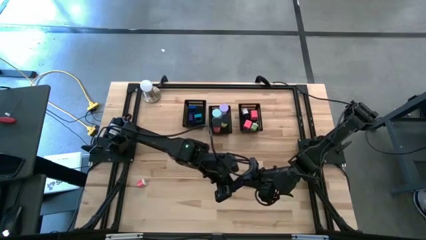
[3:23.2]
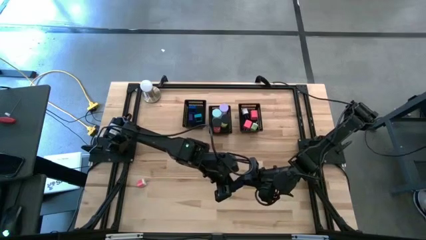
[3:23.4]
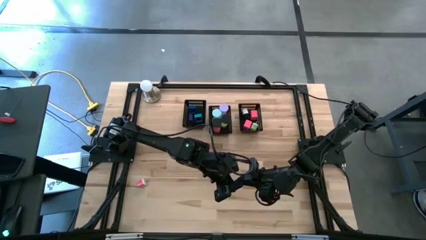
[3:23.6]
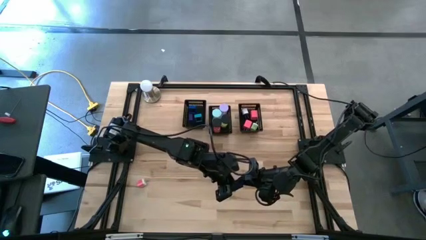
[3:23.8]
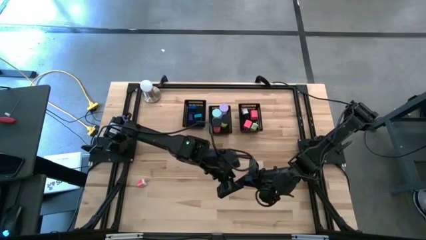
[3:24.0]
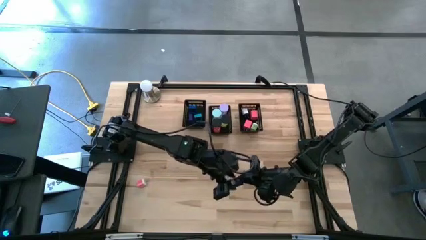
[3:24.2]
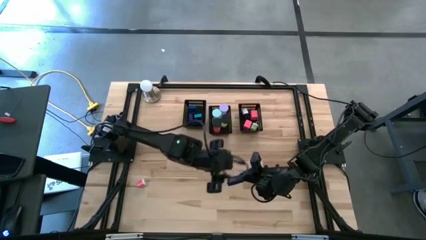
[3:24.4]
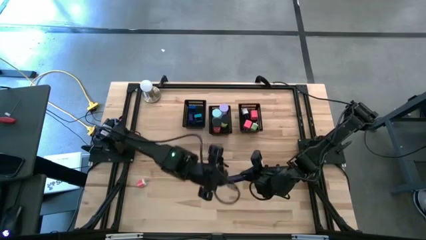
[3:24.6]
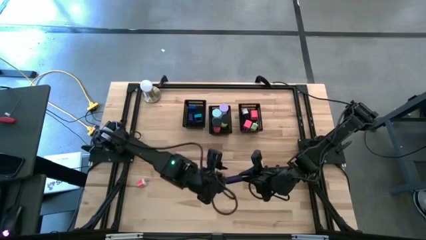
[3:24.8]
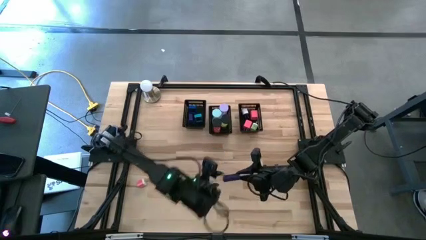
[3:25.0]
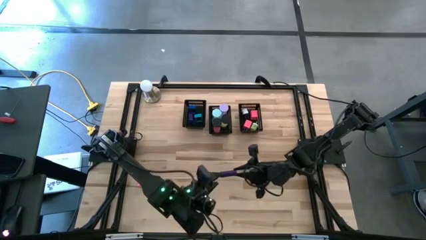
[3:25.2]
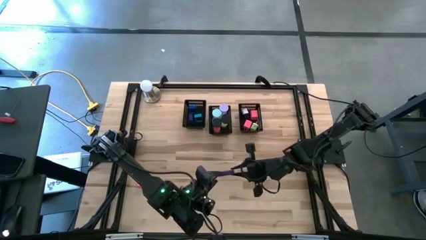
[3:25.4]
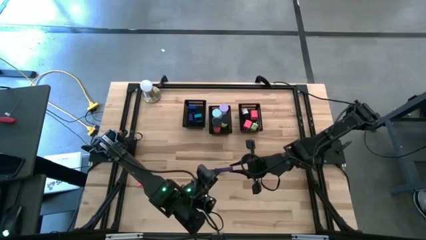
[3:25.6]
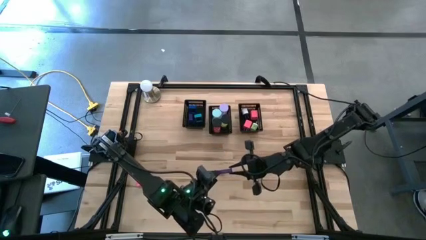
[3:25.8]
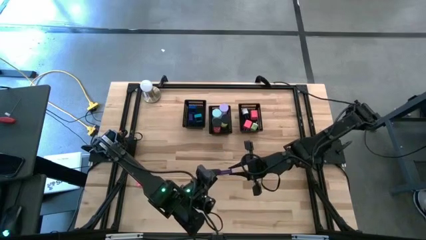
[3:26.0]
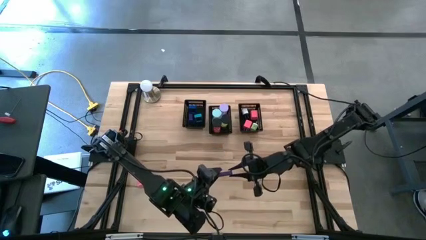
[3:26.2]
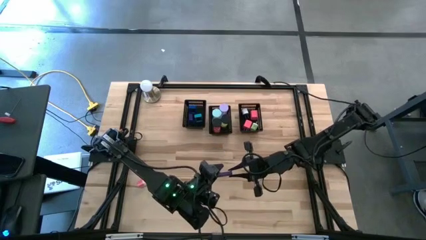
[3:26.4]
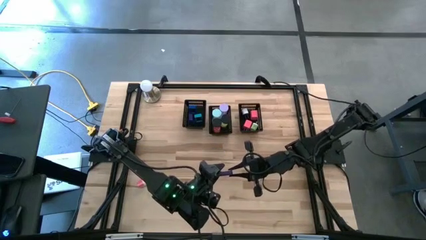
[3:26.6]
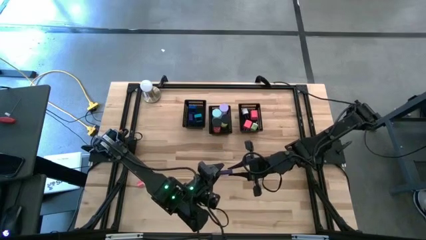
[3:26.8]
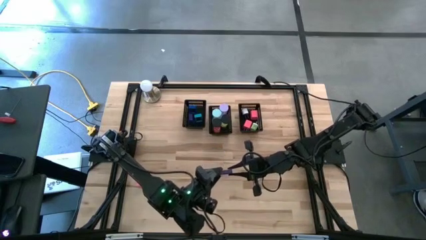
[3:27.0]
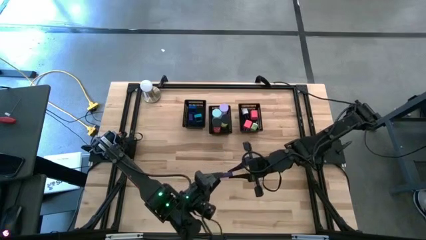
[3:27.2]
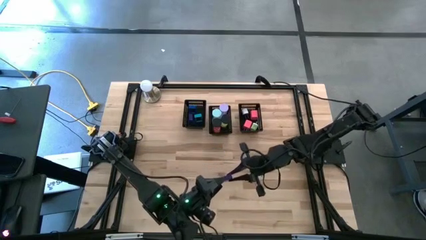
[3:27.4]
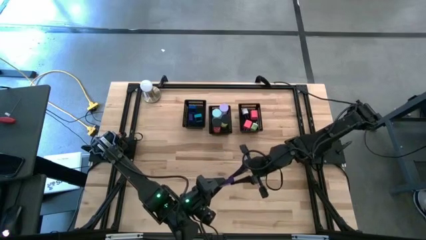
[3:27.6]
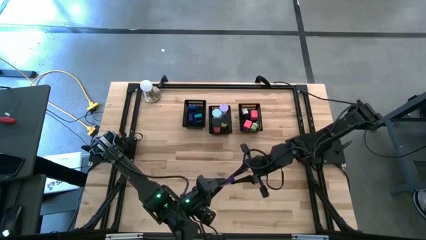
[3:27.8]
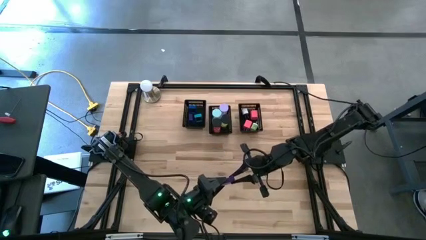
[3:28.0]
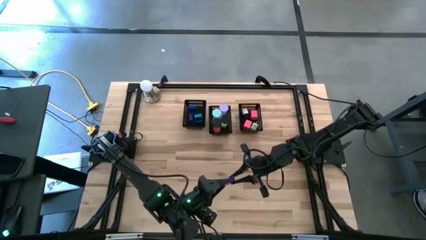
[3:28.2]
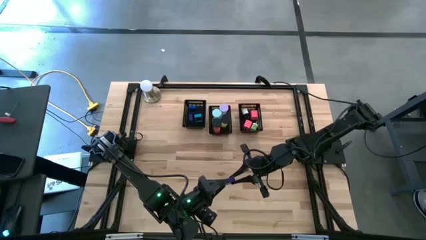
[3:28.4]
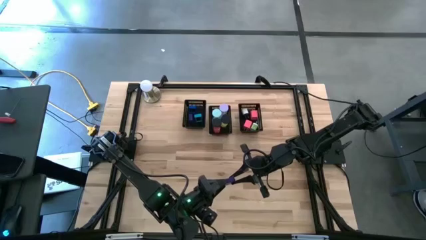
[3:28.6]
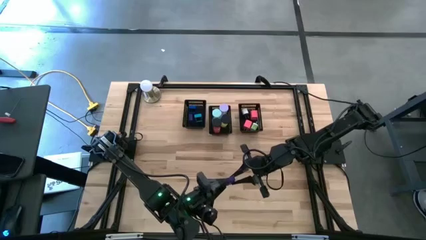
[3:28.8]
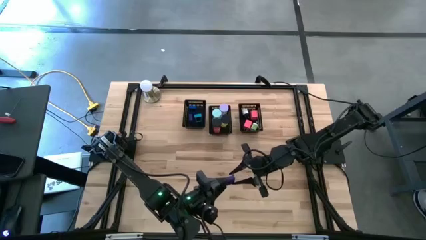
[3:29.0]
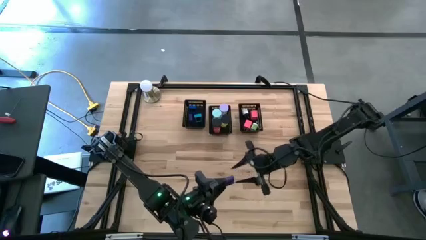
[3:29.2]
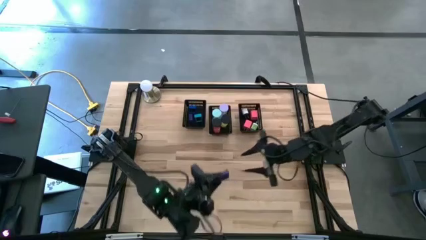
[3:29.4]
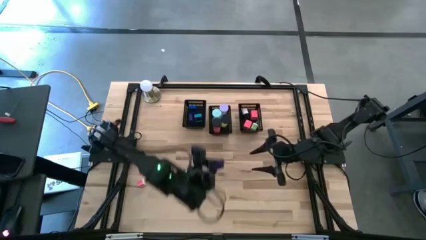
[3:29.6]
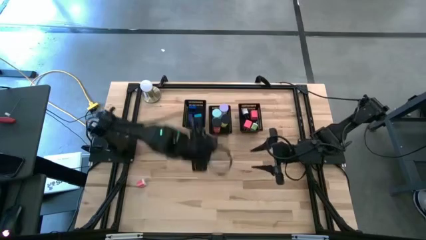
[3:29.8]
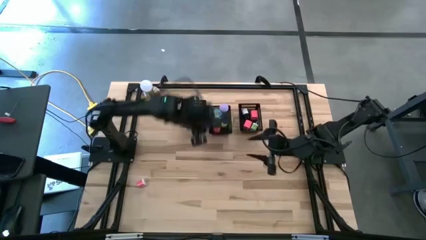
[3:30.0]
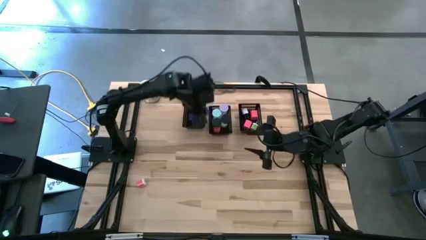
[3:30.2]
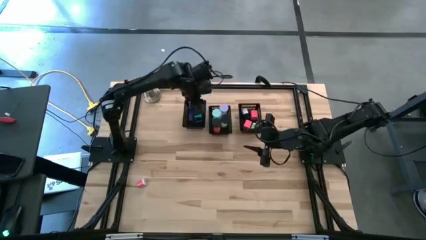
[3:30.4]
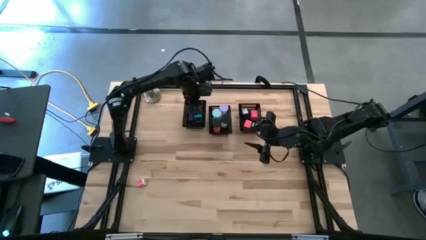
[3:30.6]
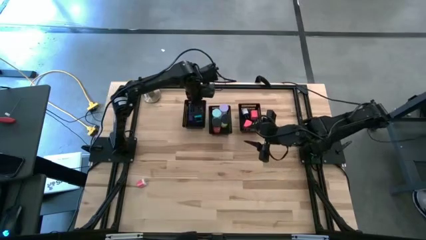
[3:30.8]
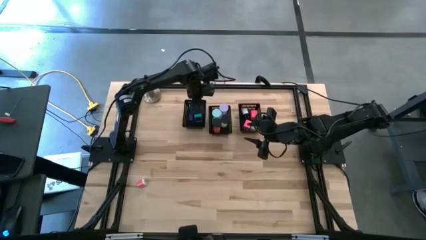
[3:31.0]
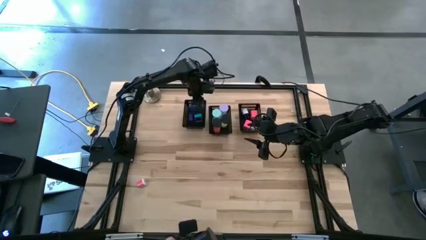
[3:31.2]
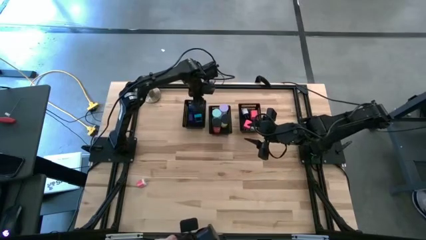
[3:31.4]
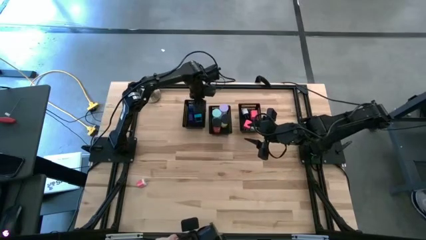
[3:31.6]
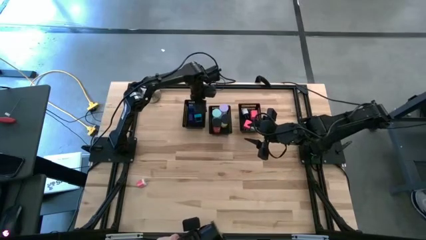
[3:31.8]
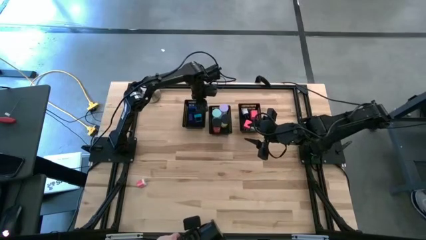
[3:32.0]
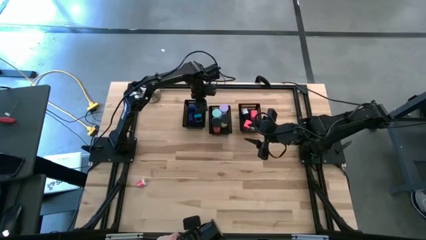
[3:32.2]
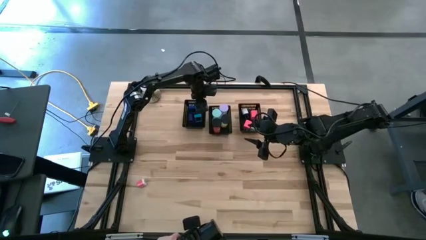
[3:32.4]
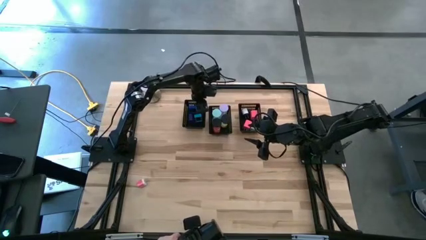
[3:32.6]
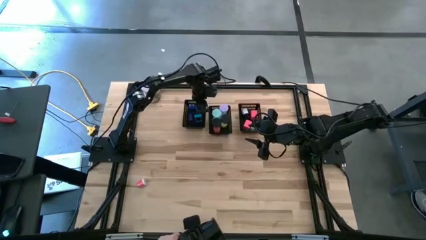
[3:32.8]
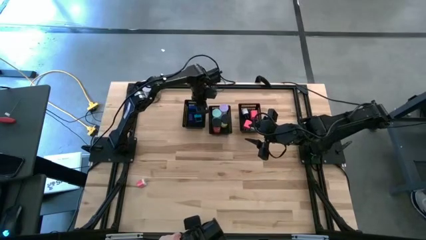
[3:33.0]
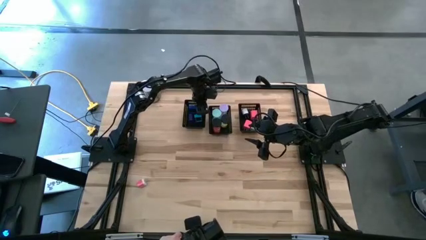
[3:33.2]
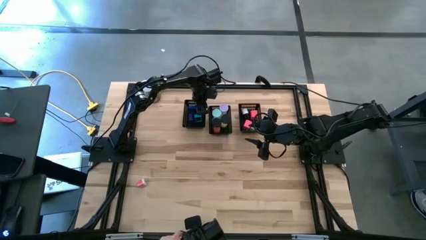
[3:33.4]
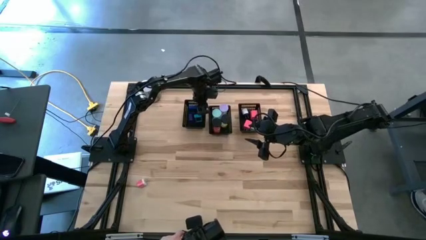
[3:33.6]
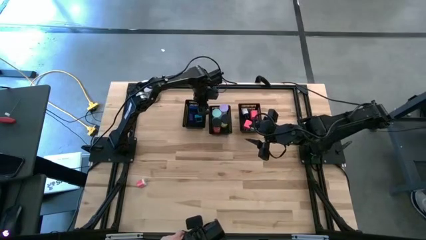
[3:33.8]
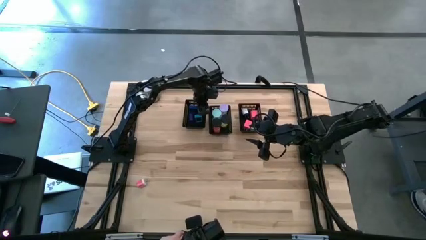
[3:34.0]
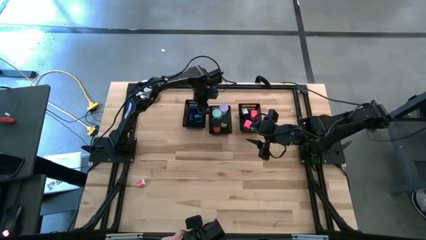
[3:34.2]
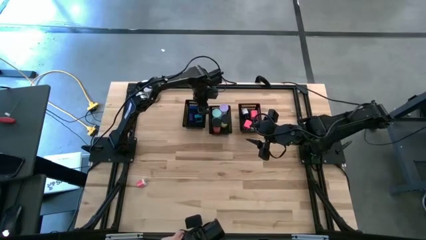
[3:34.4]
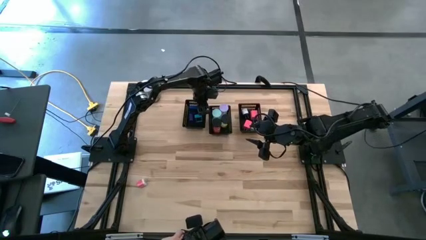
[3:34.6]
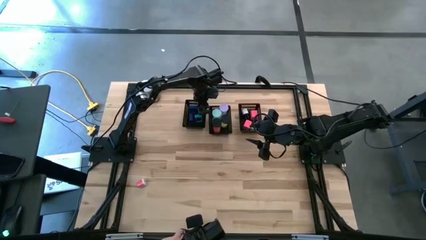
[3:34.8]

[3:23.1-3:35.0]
Task: Pick & Place Office items
Put the blue digital clock into the left black bin

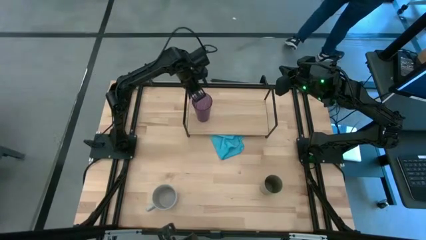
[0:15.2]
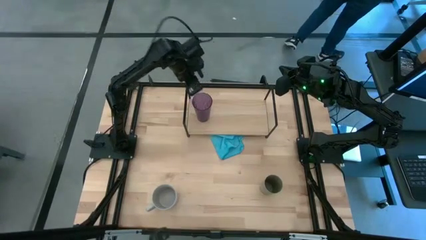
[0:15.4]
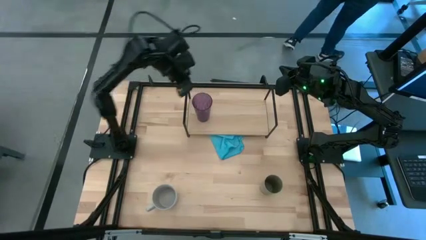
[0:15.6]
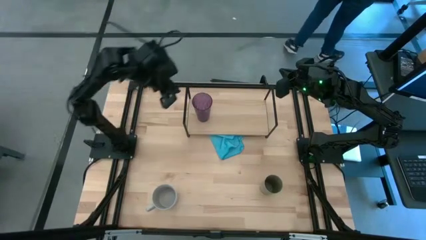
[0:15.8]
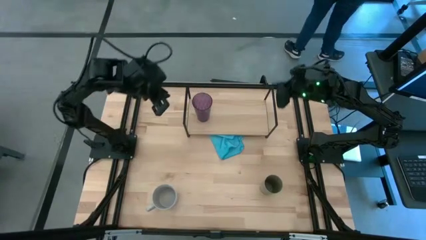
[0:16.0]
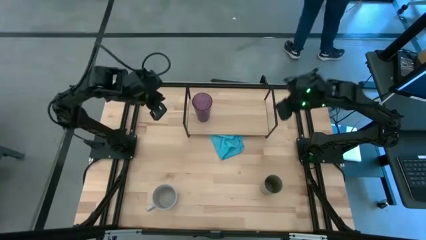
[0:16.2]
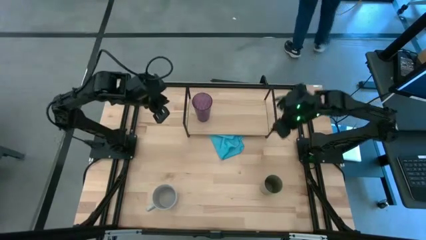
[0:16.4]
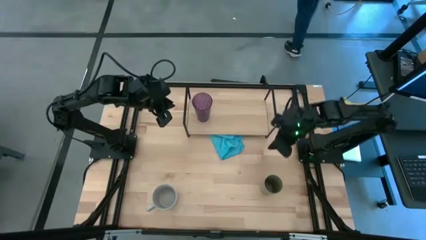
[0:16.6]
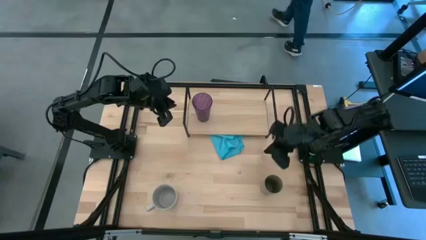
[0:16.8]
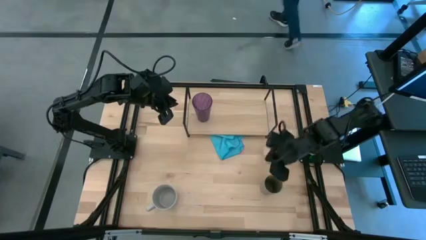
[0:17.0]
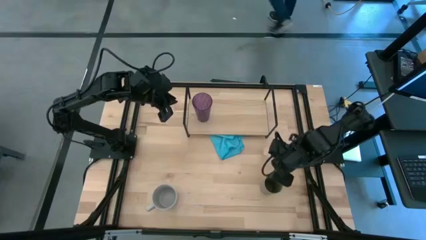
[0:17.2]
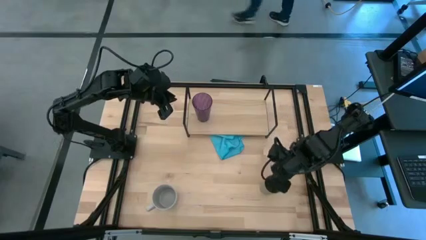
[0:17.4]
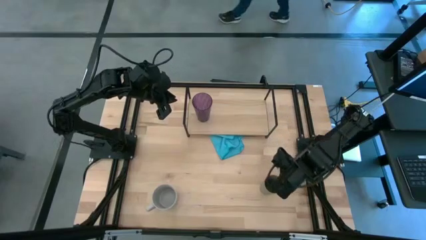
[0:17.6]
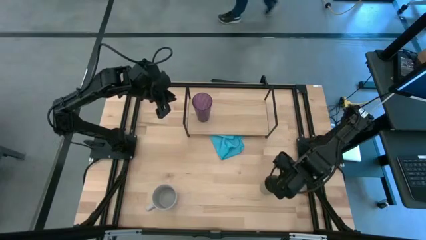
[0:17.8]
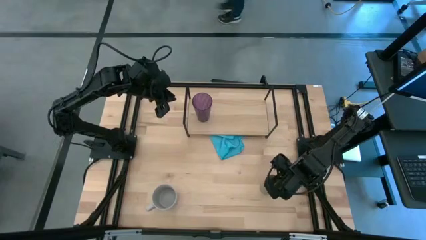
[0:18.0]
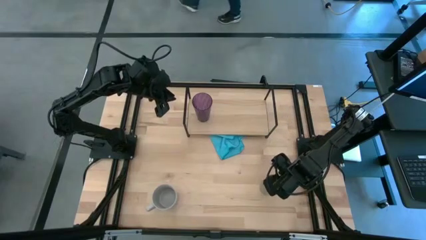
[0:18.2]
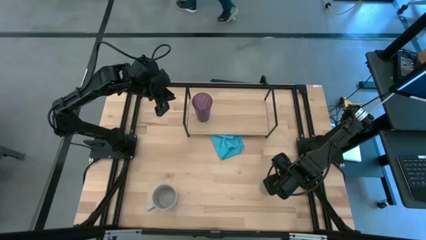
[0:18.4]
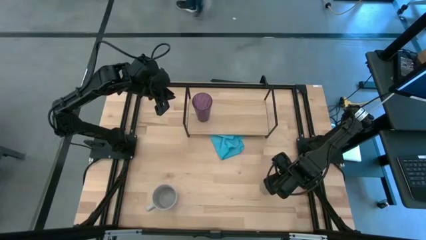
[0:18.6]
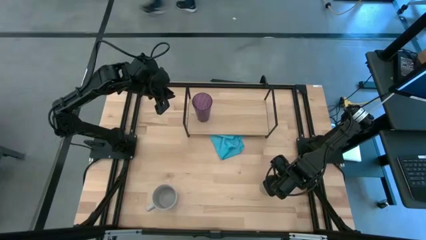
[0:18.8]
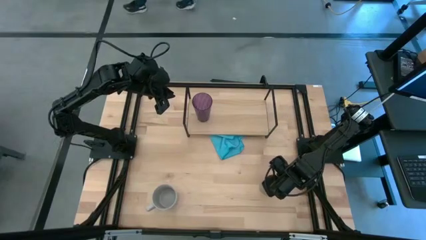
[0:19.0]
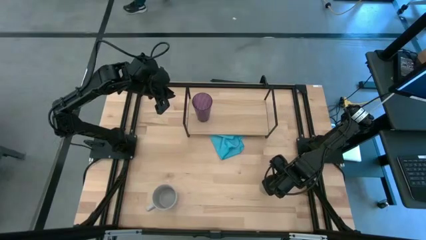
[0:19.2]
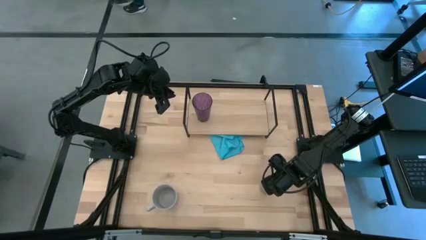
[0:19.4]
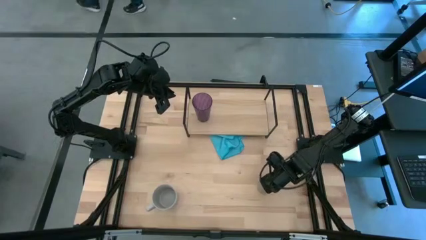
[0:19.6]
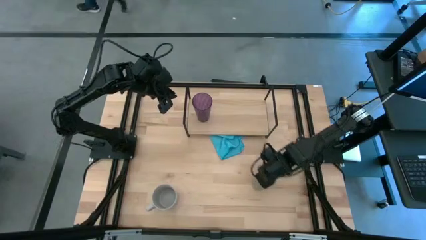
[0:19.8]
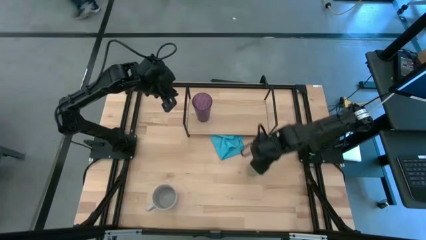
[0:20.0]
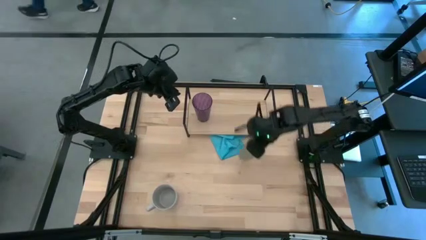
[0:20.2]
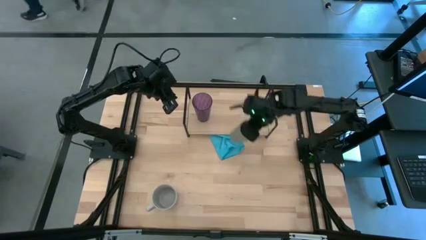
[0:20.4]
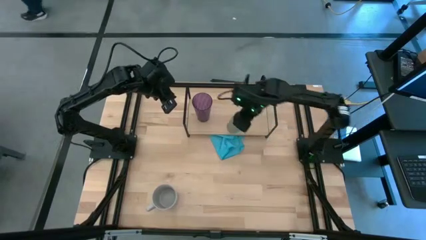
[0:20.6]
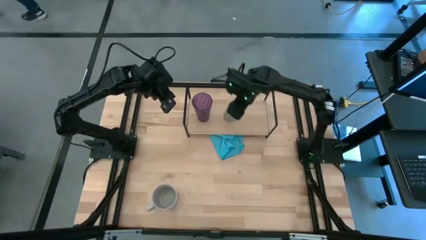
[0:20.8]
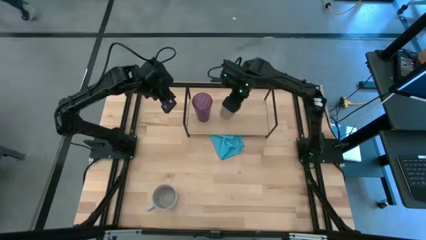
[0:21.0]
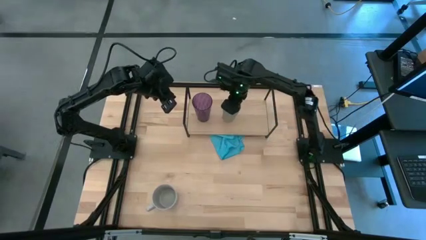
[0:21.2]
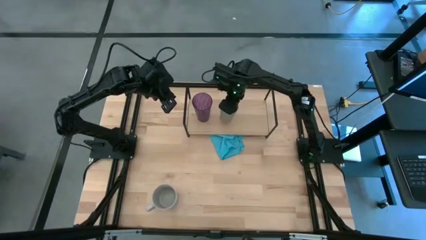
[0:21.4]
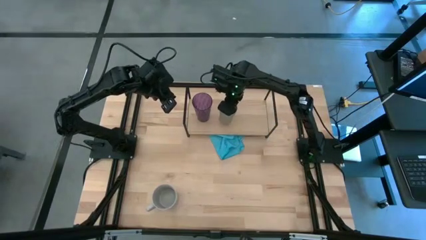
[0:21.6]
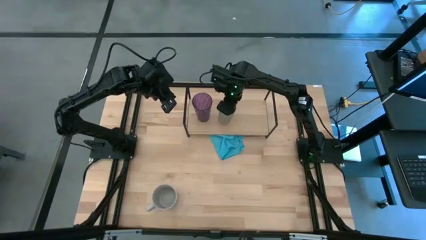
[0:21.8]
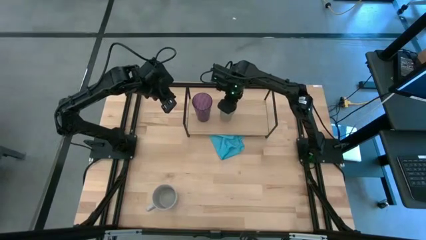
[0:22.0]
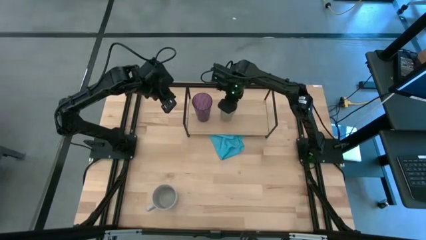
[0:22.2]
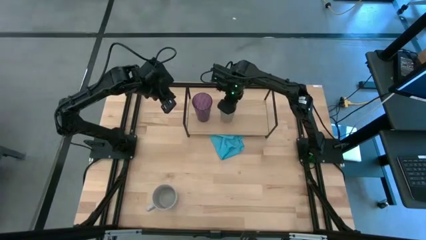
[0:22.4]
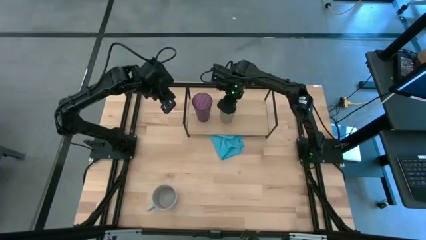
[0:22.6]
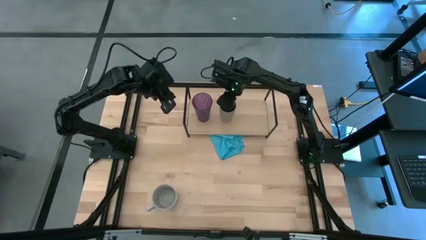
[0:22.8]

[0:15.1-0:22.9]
Task: Stack small to large cups/mugs on shelf
Put the brown cup on the shelf
